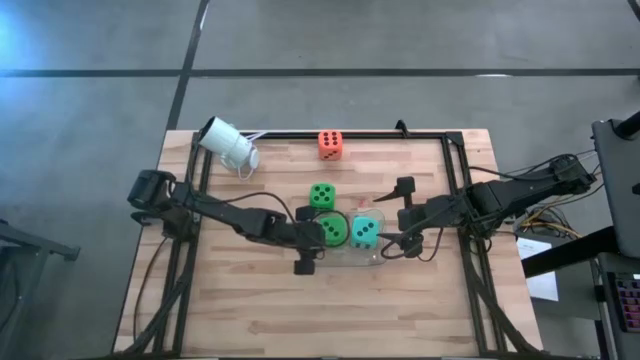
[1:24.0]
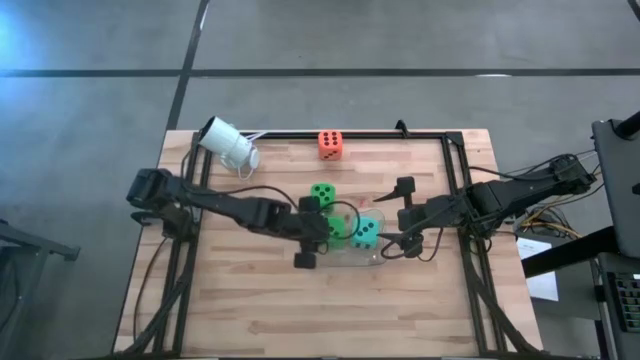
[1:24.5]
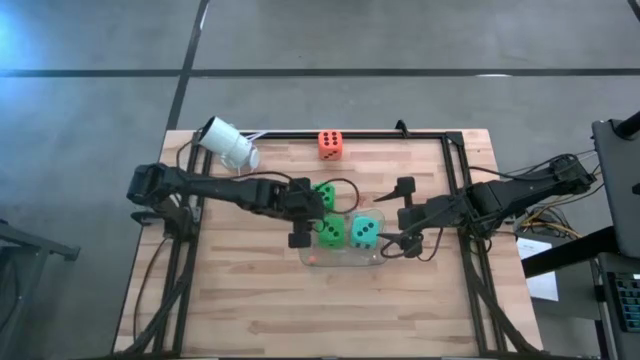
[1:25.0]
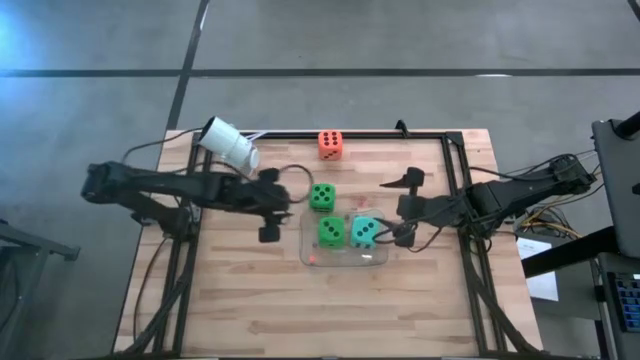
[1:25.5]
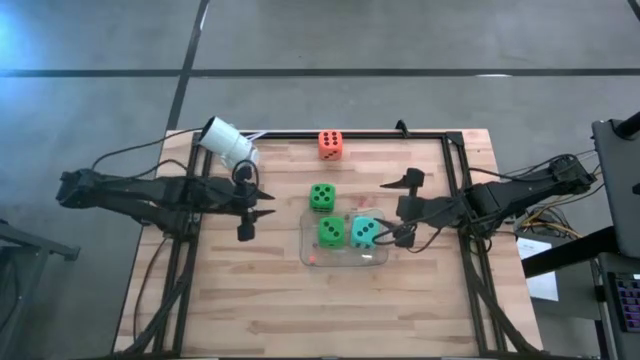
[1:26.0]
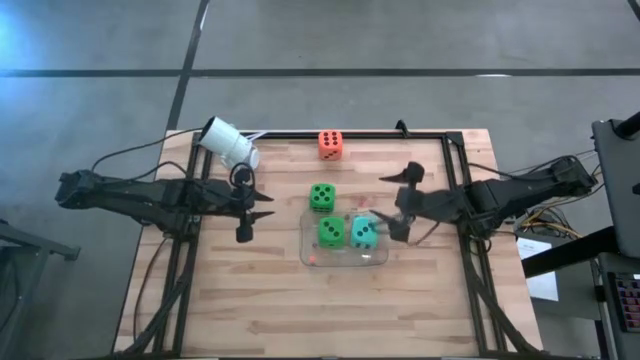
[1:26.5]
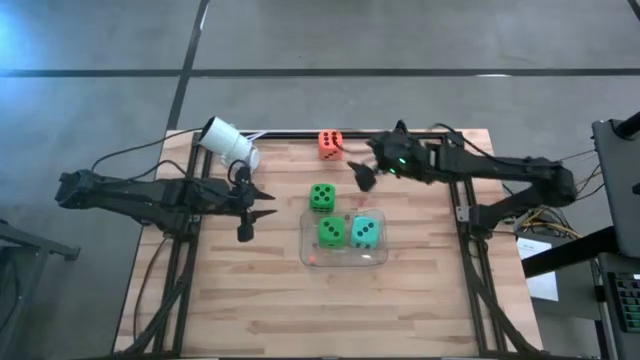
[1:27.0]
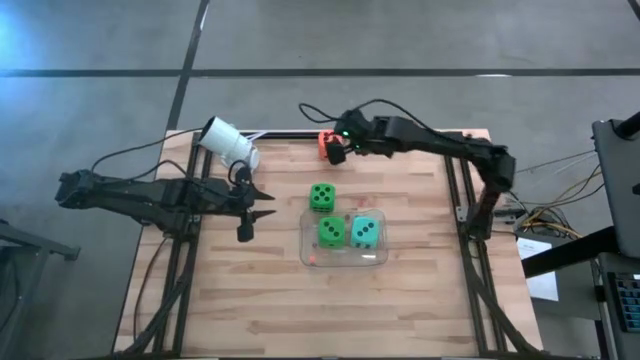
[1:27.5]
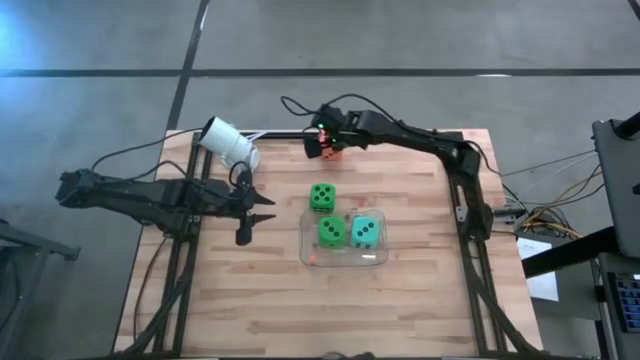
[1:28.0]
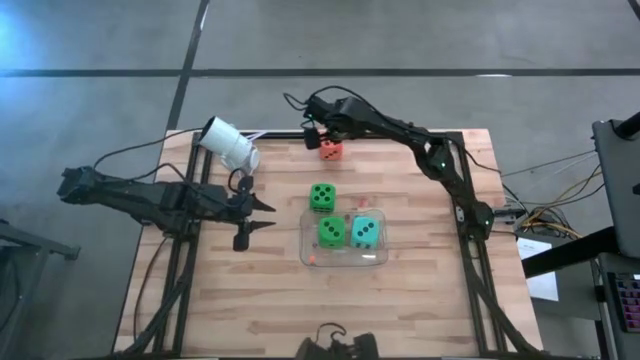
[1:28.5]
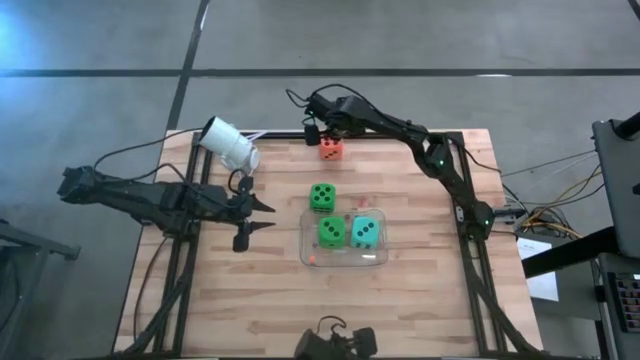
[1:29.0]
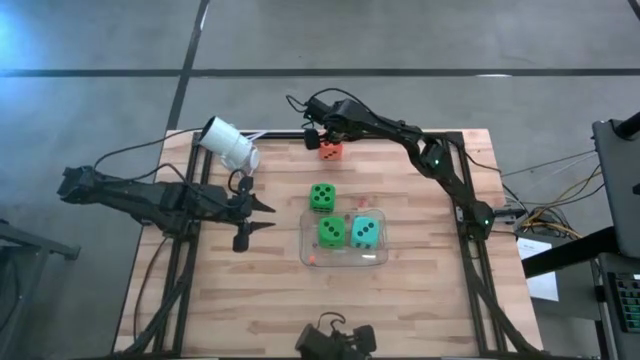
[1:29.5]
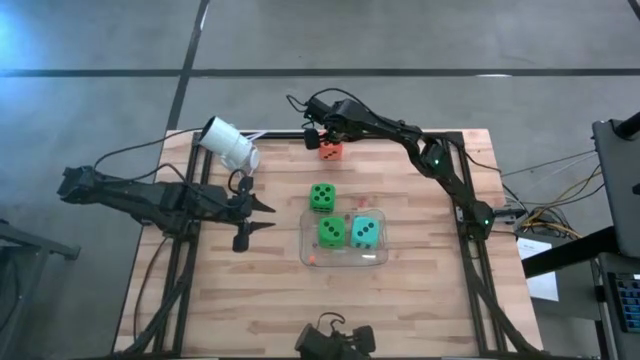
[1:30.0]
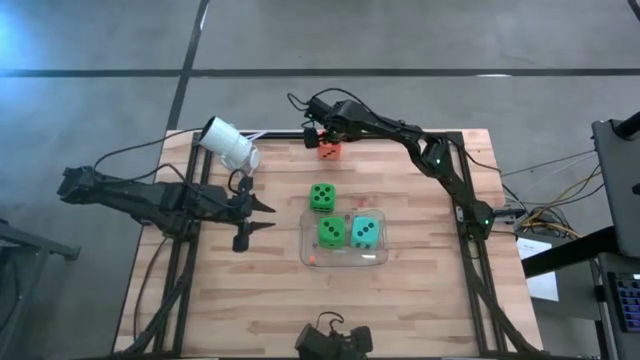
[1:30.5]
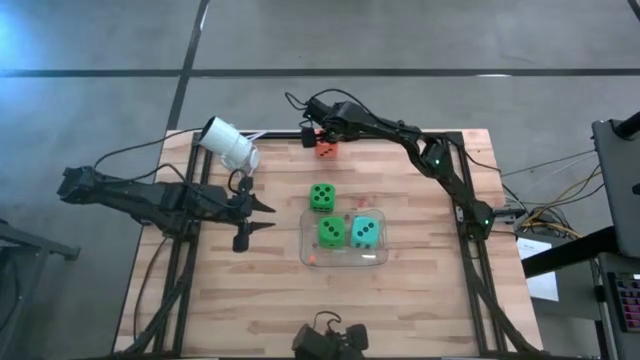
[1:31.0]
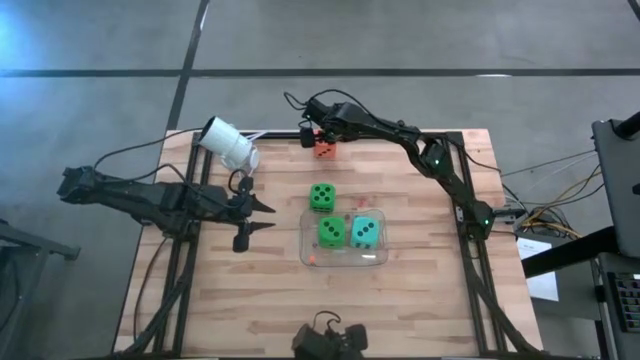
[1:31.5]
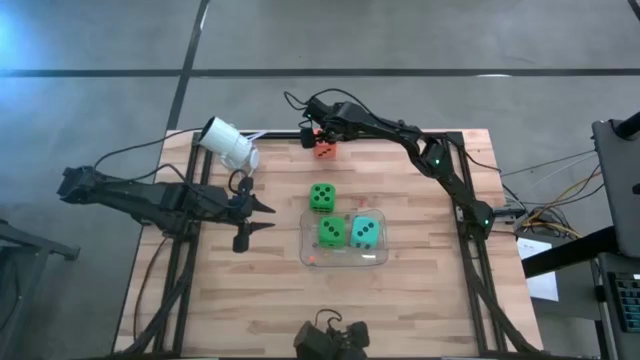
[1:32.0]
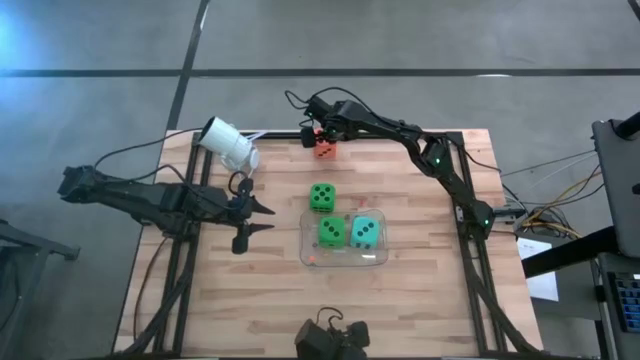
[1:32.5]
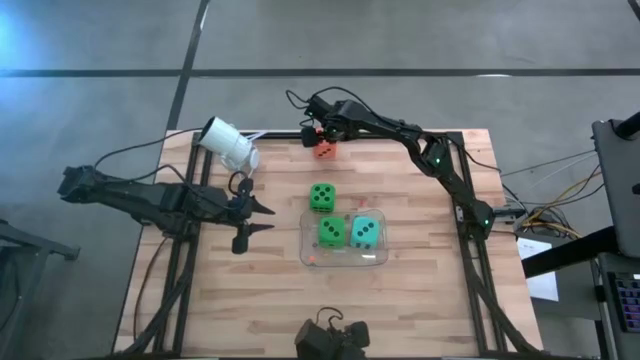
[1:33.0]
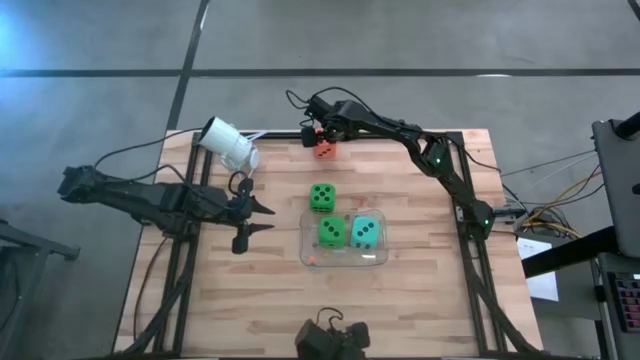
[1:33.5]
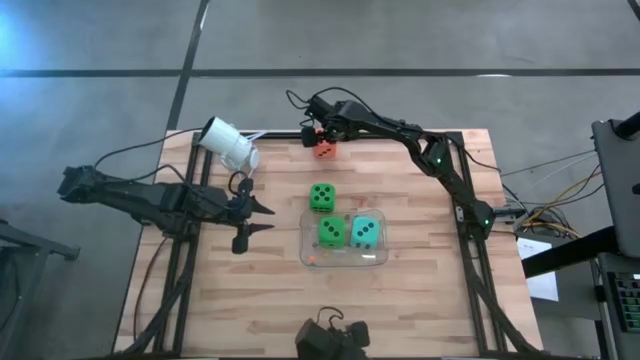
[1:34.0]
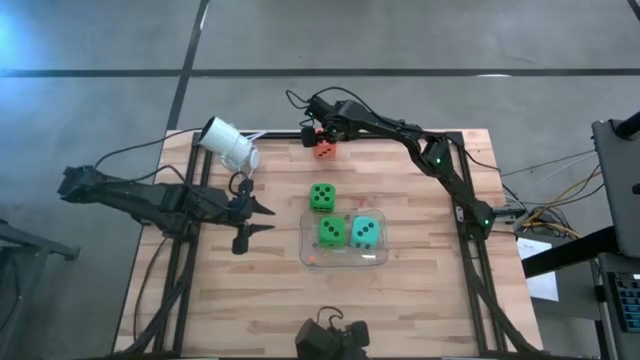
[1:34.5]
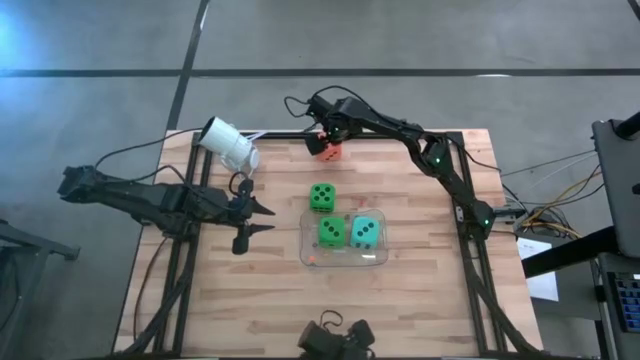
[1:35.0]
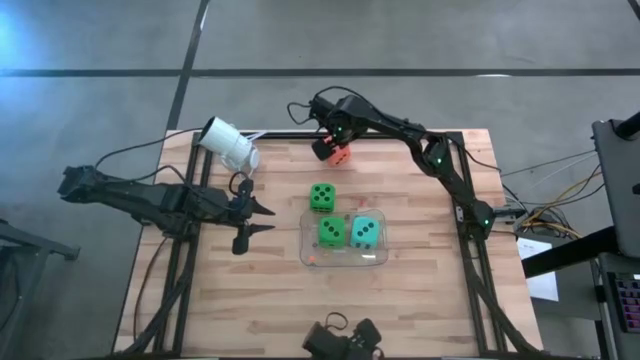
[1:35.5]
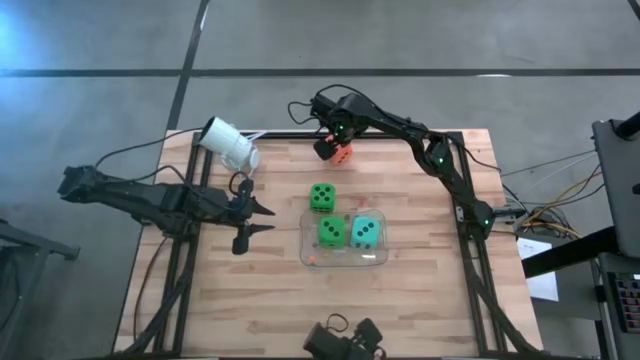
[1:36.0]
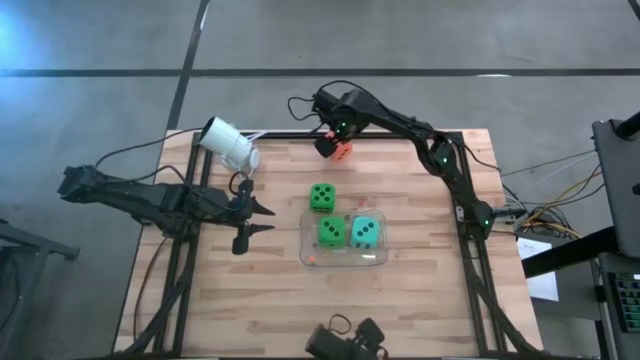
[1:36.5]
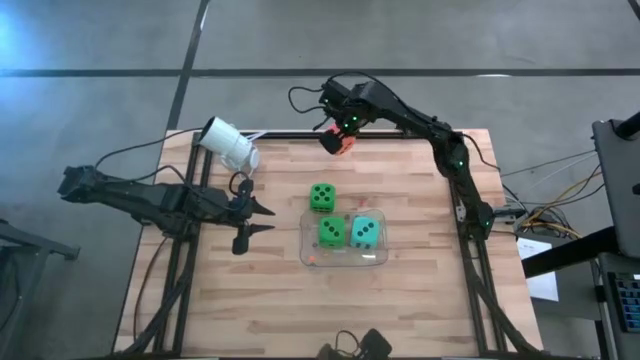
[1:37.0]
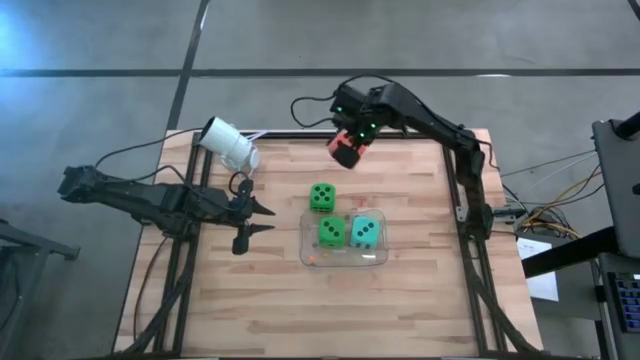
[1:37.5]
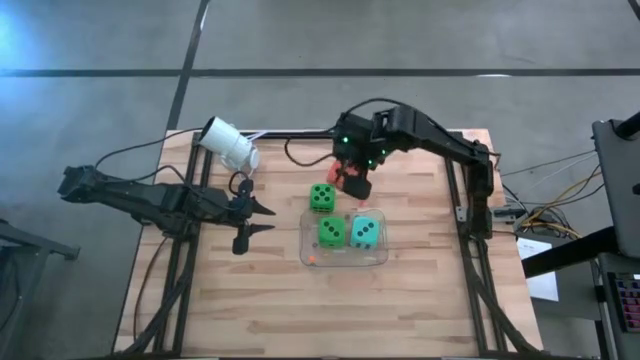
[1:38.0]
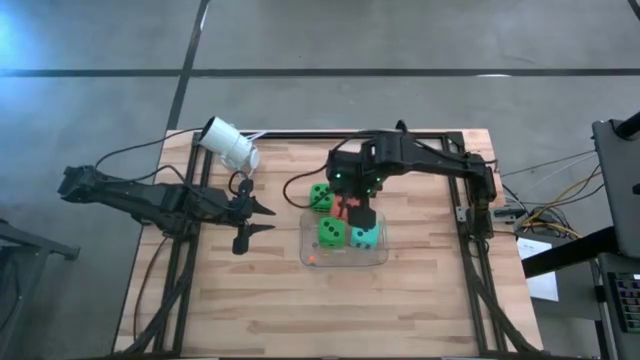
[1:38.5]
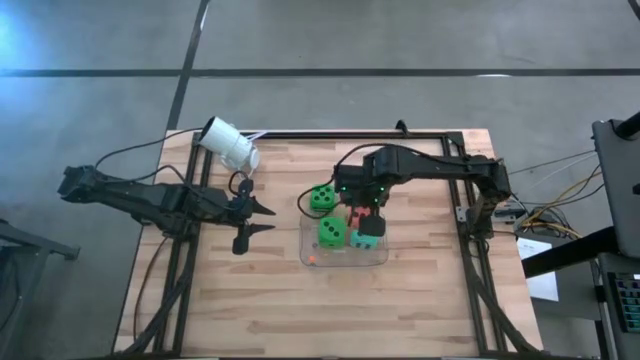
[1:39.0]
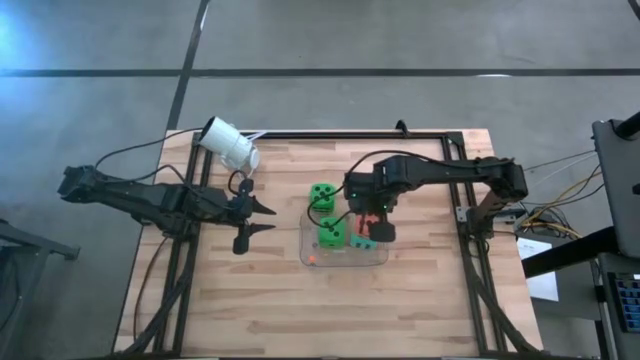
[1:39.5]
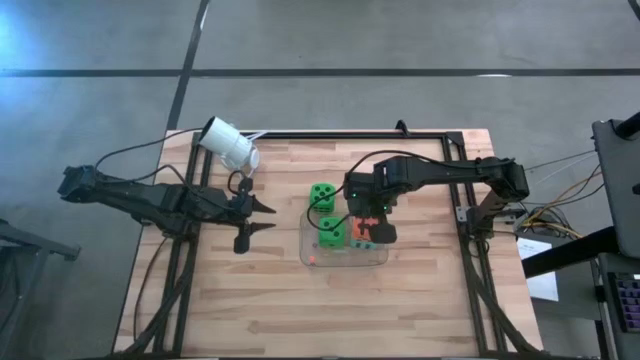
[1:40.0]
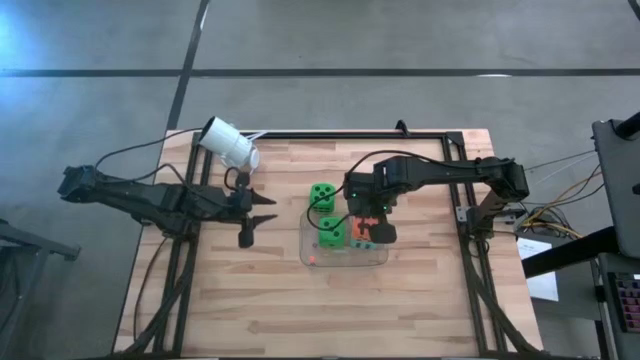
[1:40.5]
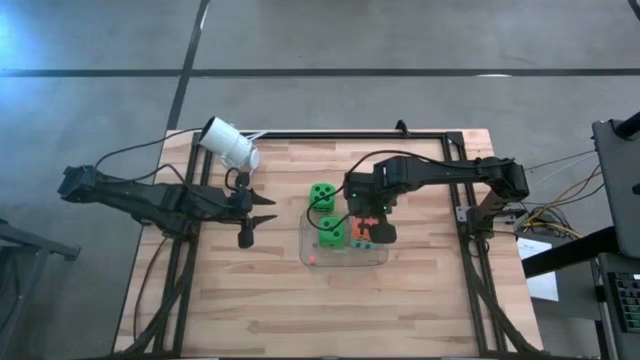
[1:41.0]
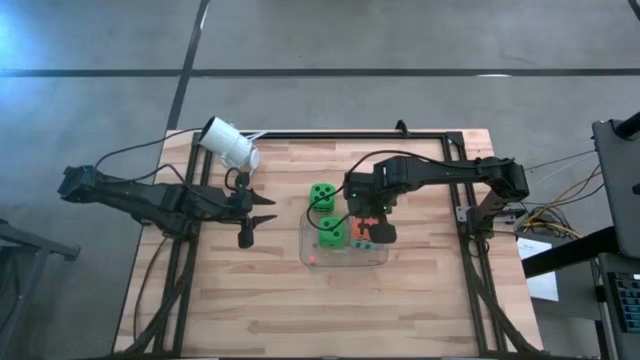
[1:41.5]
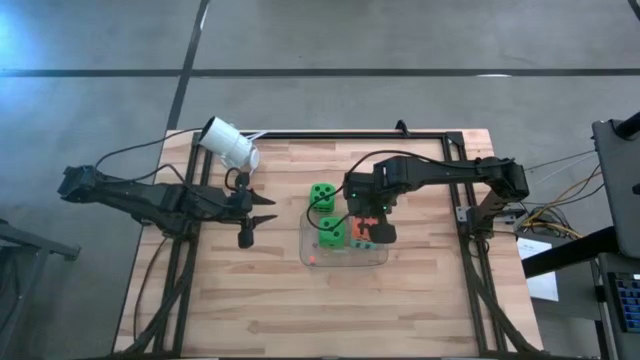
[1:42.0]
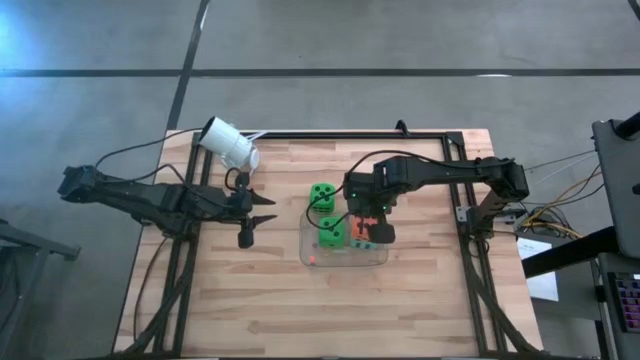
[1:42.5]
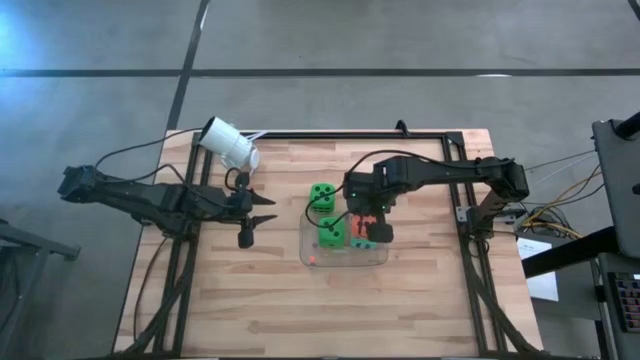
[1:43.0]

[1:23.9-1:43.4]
Task: Pick & Place Dice
Put the large orange die into the transparent bin

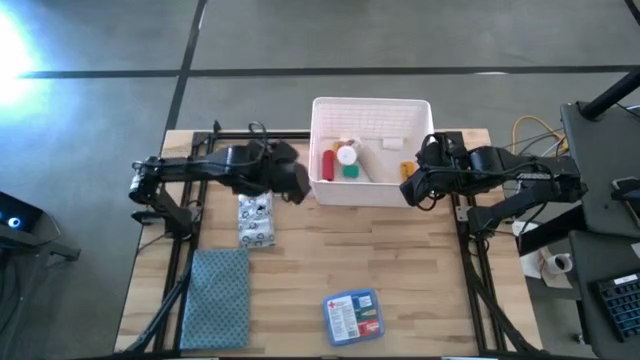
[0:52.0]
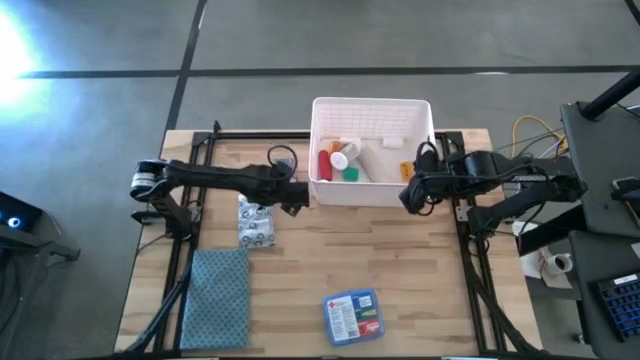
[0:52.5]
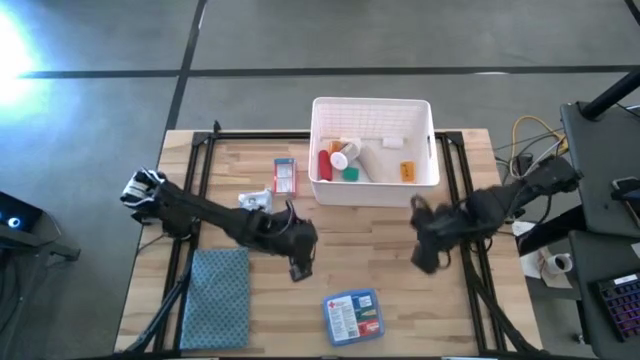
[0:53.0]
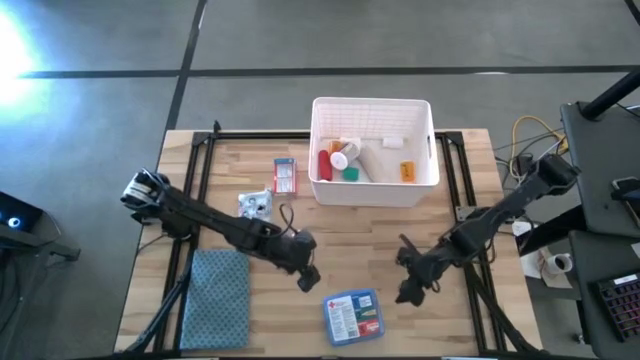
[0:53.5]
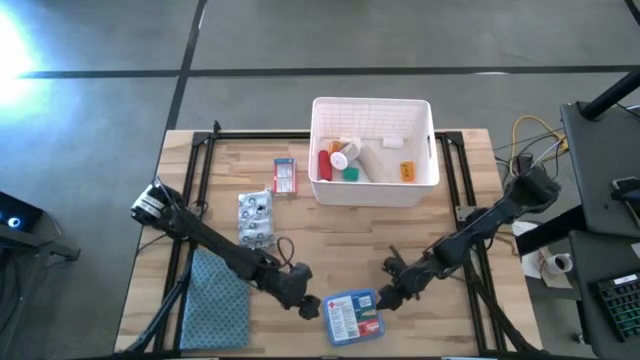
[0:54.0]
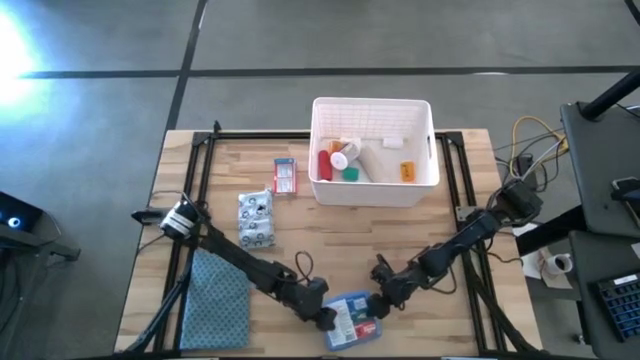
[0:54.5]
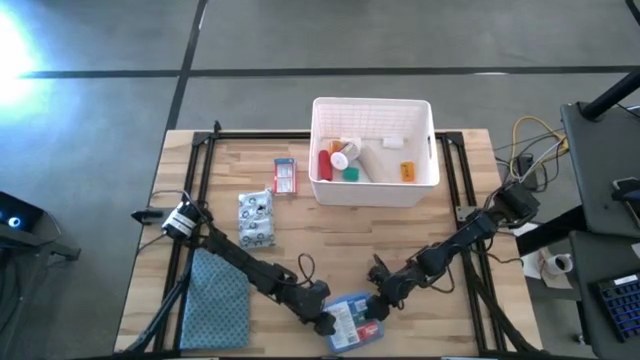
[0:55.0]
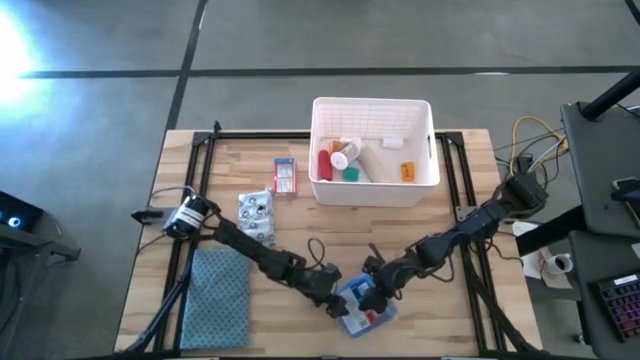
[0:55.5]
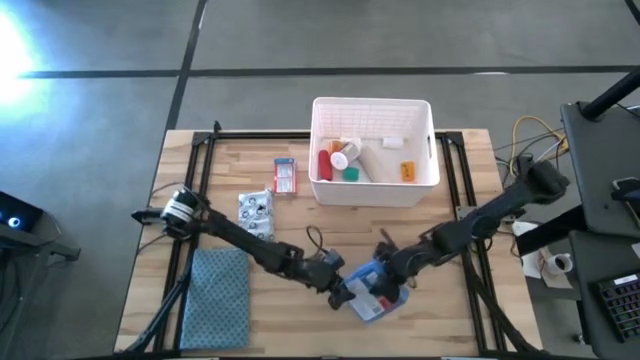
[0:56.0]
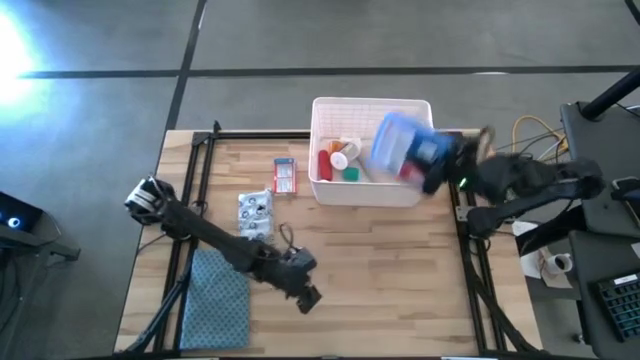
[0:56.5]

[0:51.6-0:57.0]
Task: Pick & place medical supplies in basket/bin
Put the blue first aid kit into the bin
